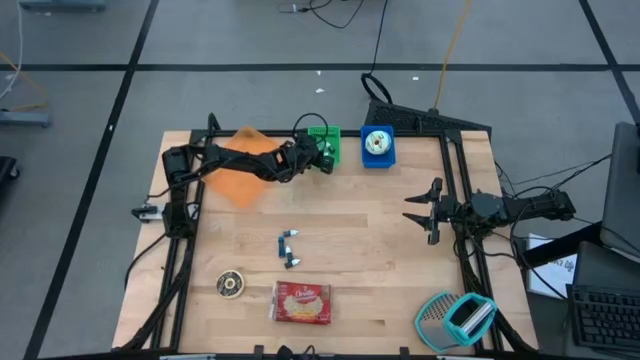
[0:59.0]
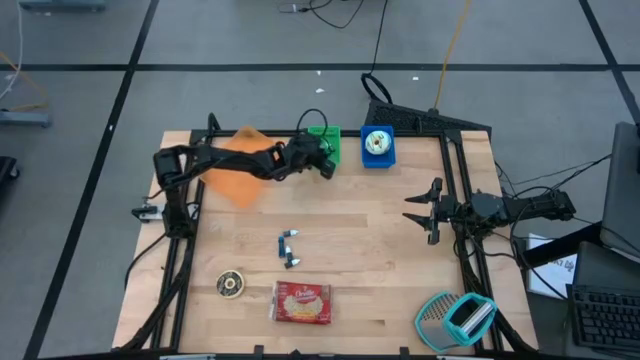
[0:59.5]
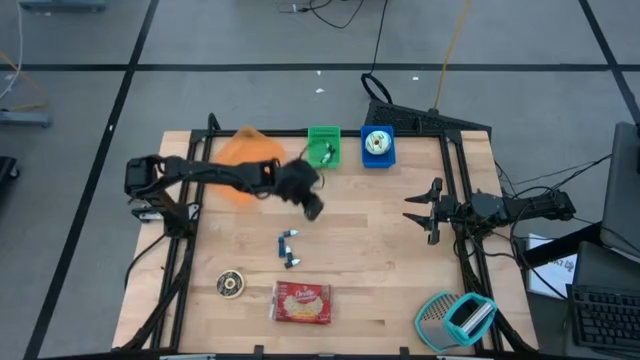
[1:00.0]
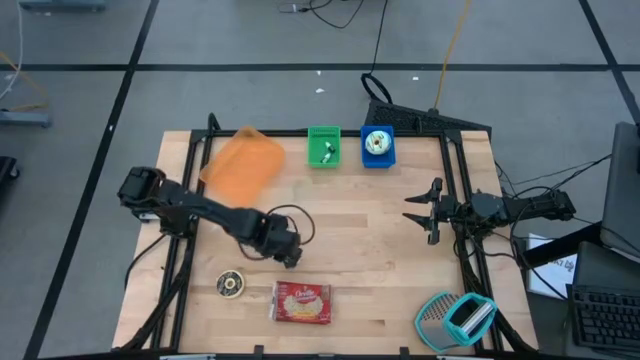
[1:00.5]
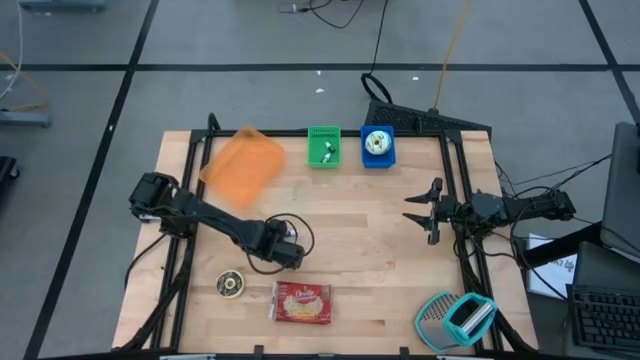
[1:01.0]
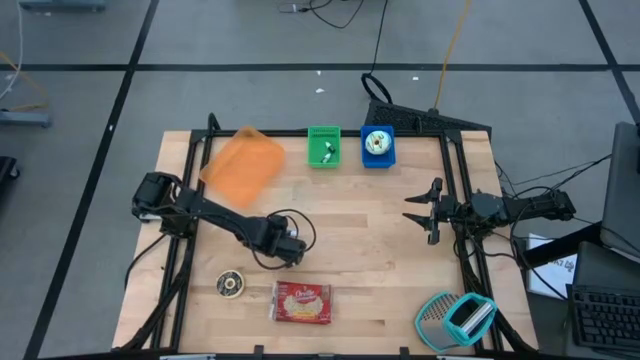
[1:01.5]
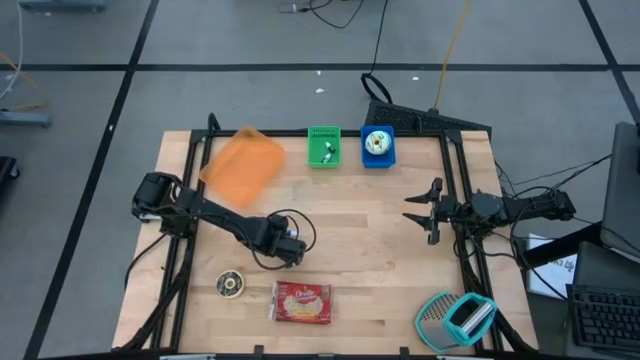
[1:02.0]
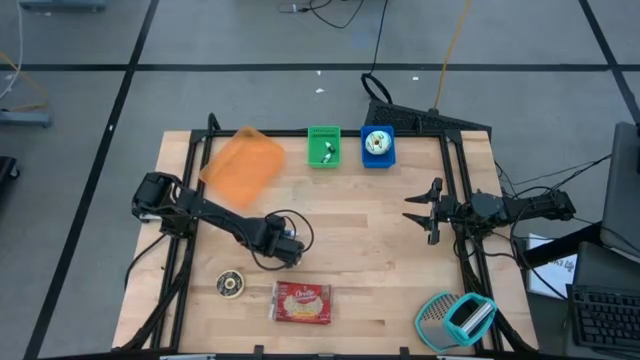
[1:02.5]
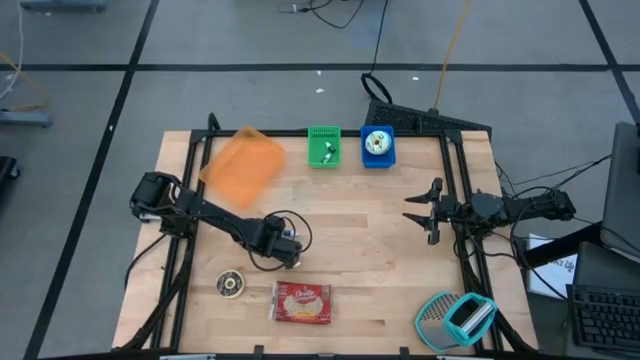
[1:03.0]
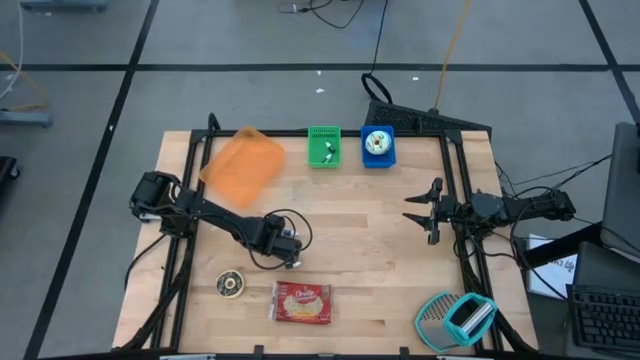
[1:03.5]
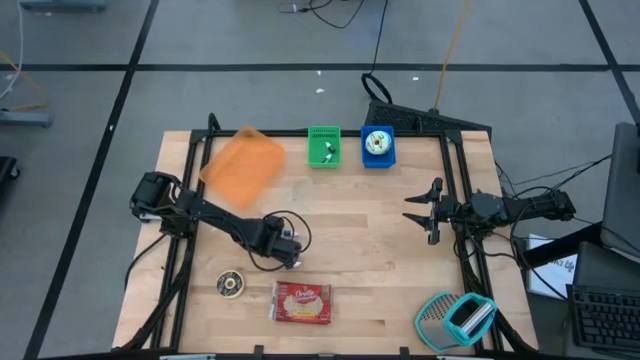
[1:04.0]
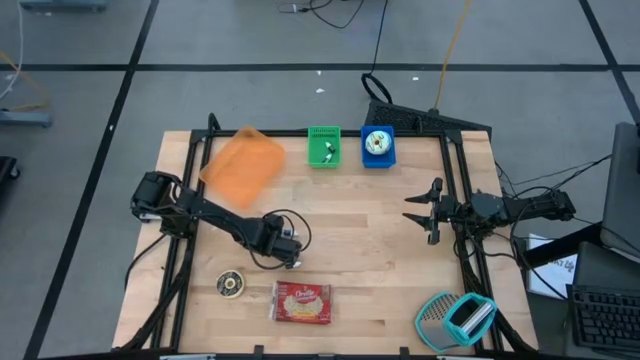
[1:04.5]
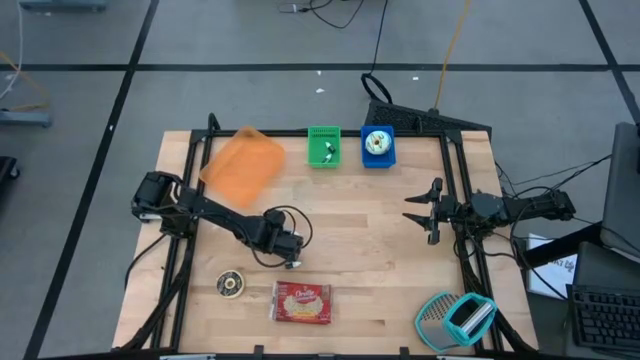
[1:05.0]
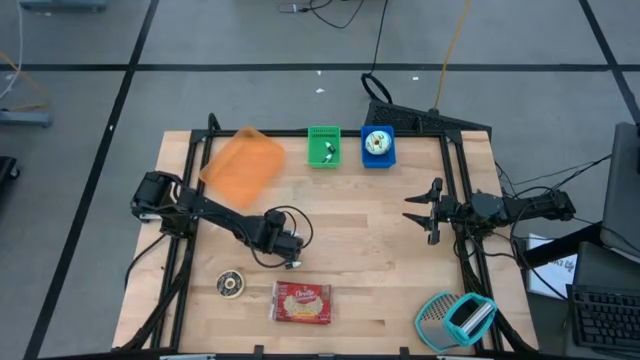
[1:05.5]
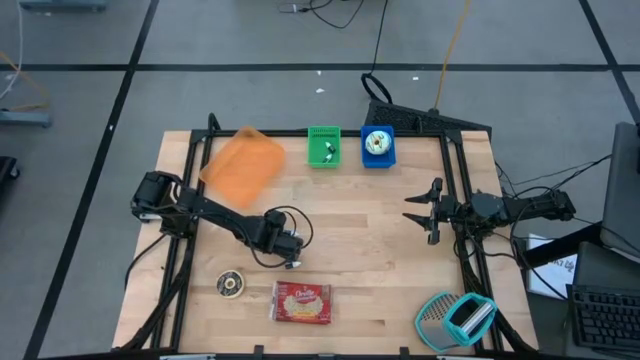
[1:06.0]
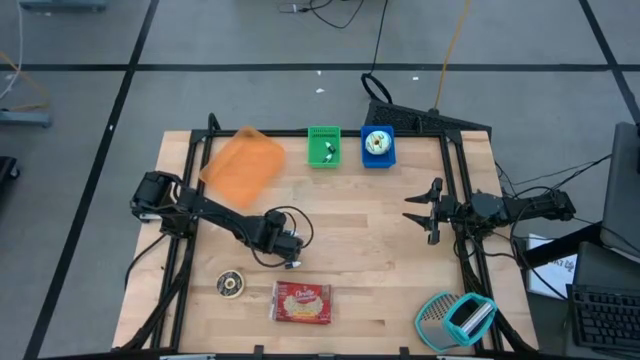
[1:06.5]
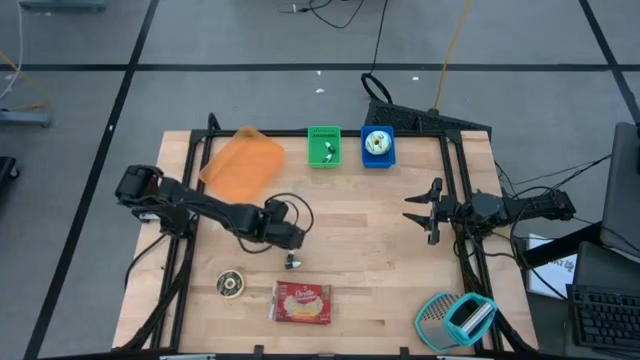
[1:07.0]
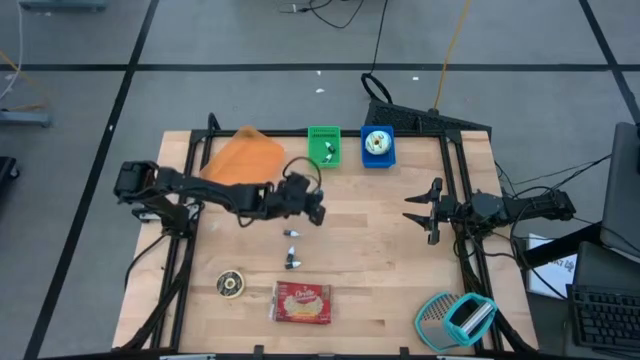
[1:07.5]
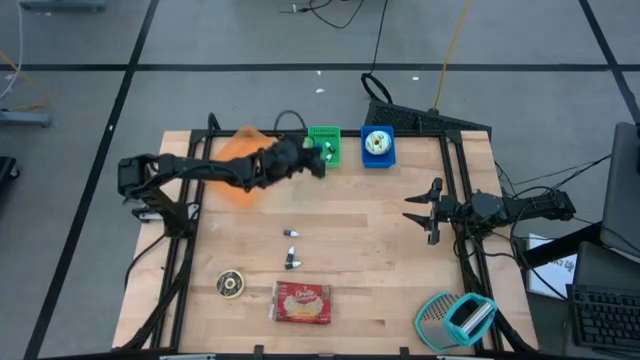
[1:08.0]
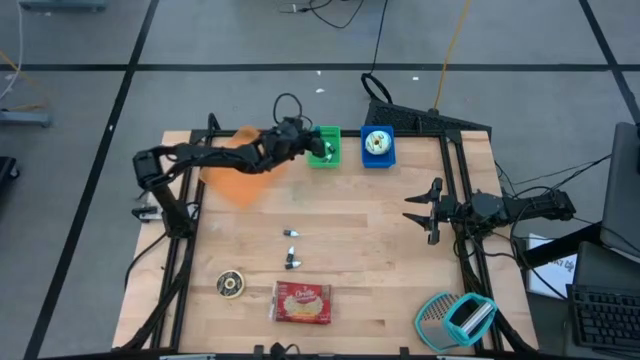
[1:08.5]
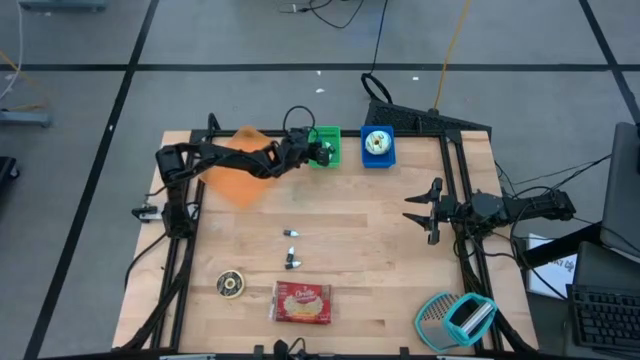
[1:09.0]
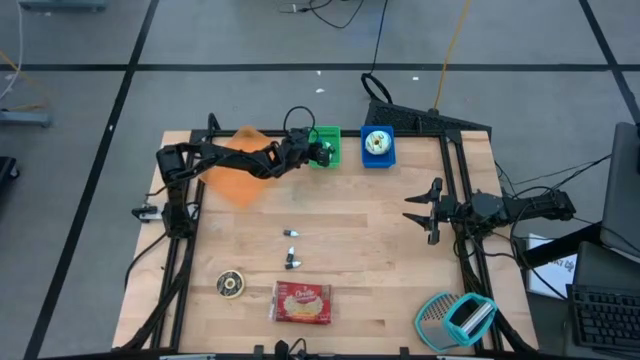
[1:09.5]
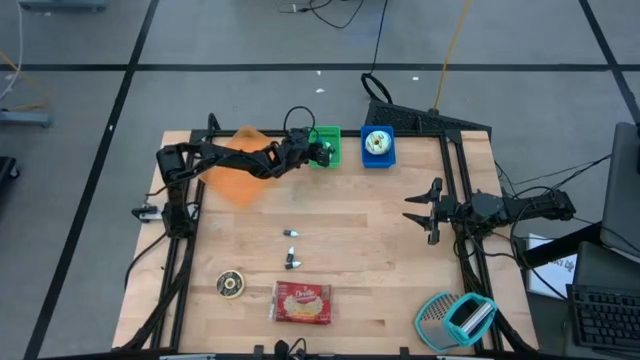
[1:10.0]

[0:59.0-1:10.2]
Put the blue food coloring bottle into the green bin

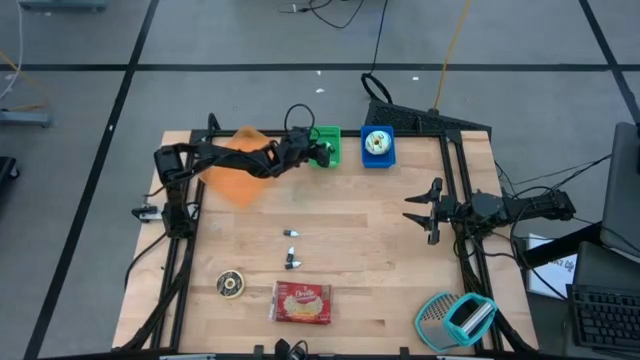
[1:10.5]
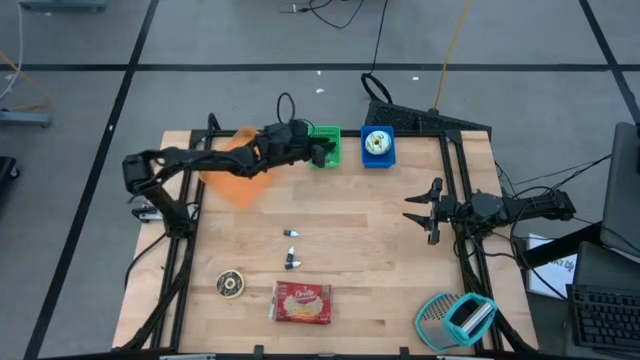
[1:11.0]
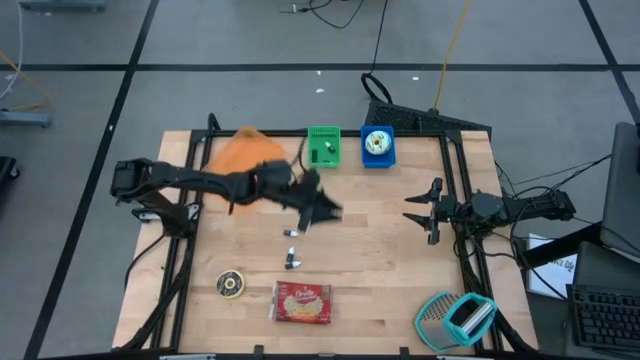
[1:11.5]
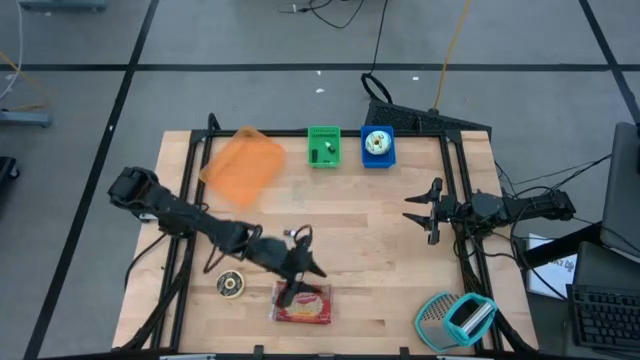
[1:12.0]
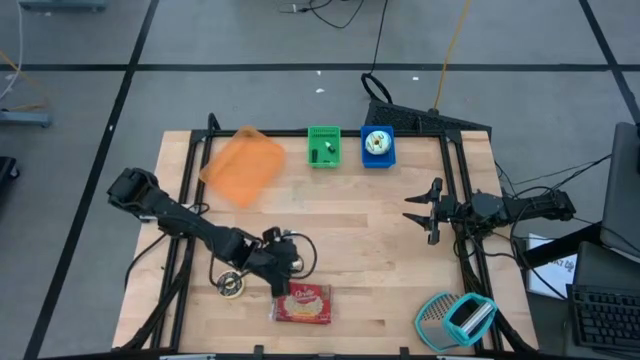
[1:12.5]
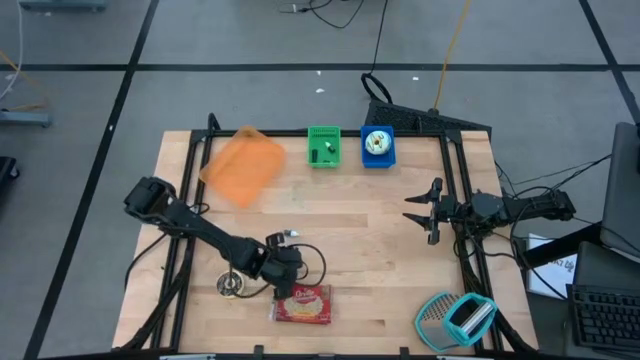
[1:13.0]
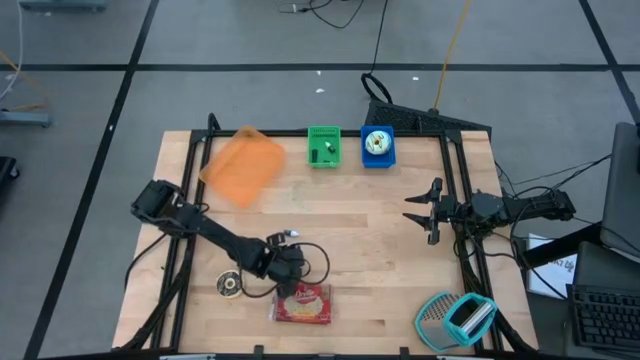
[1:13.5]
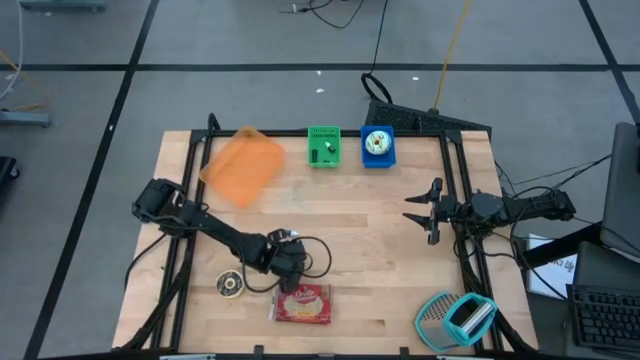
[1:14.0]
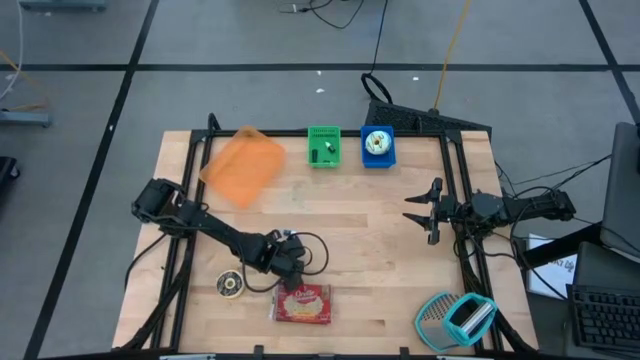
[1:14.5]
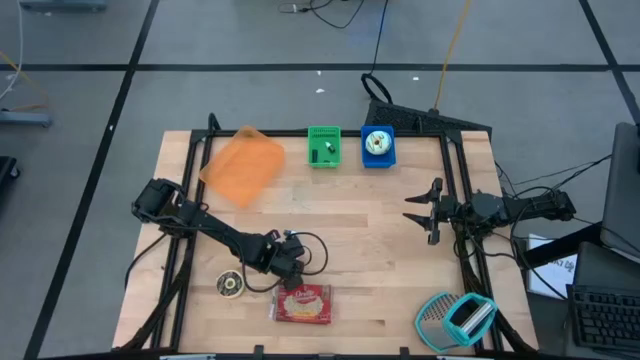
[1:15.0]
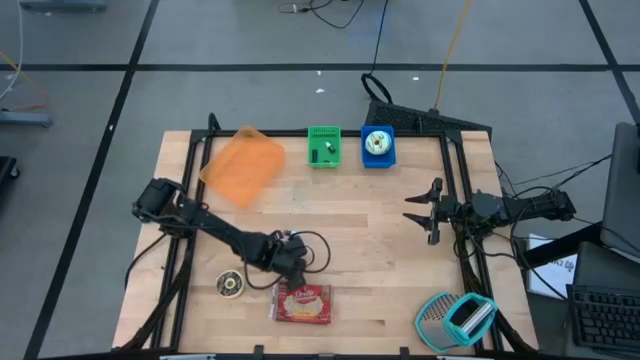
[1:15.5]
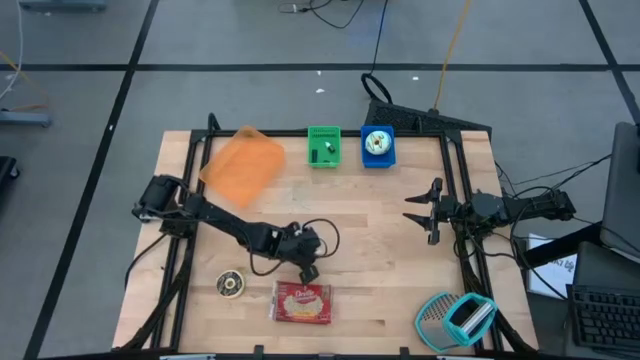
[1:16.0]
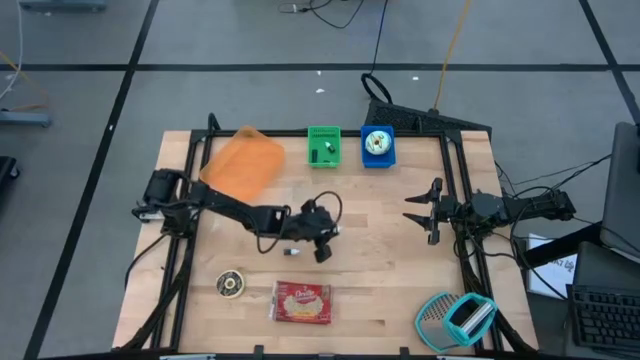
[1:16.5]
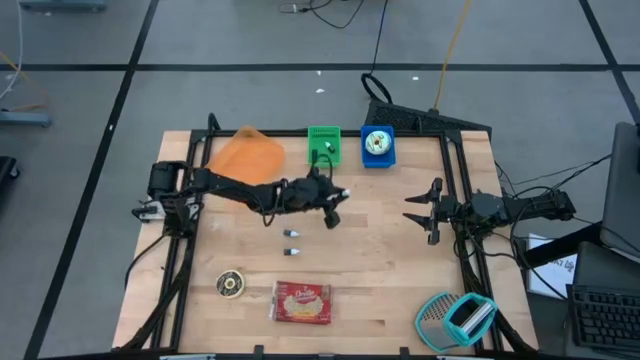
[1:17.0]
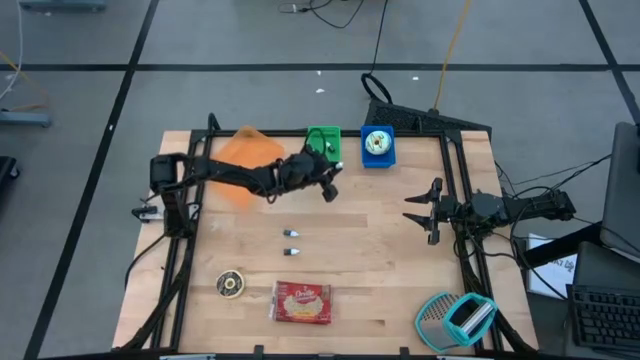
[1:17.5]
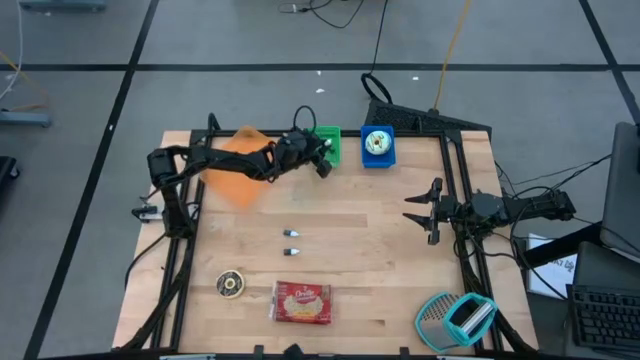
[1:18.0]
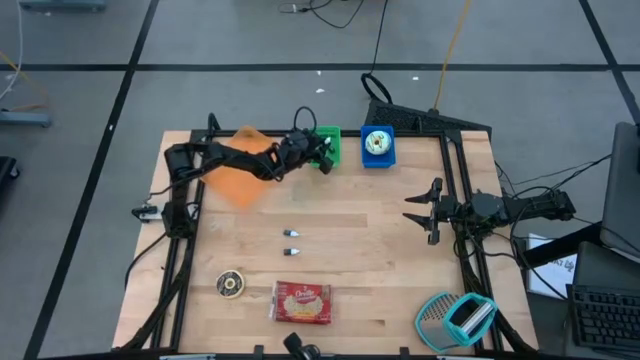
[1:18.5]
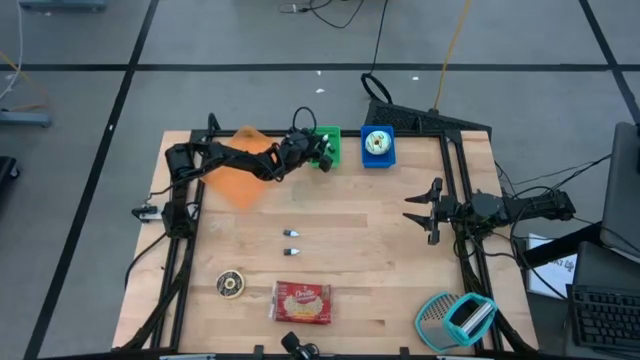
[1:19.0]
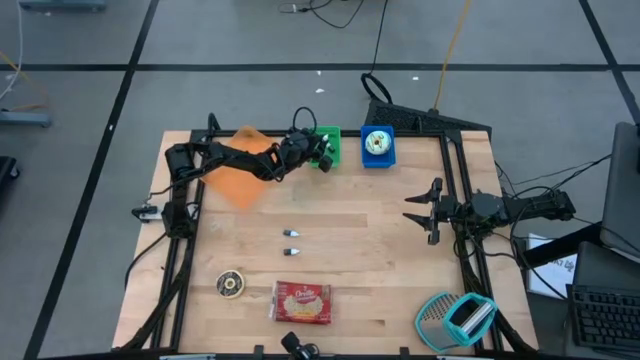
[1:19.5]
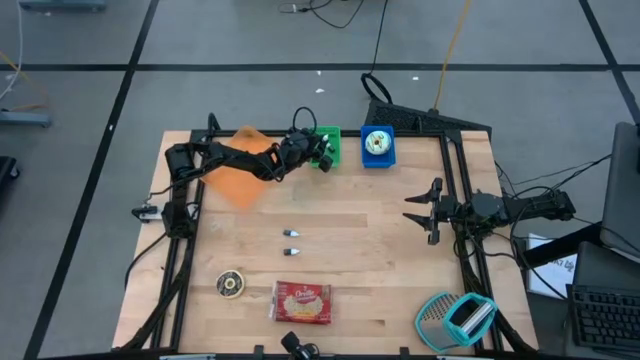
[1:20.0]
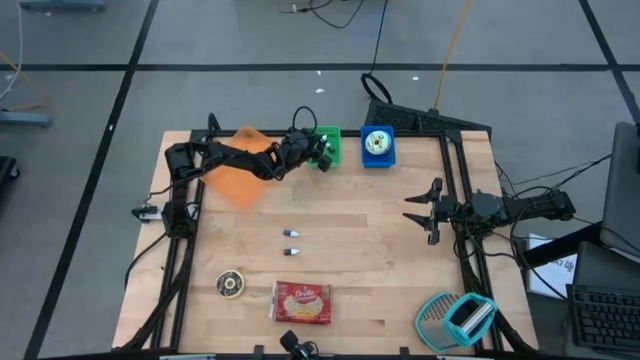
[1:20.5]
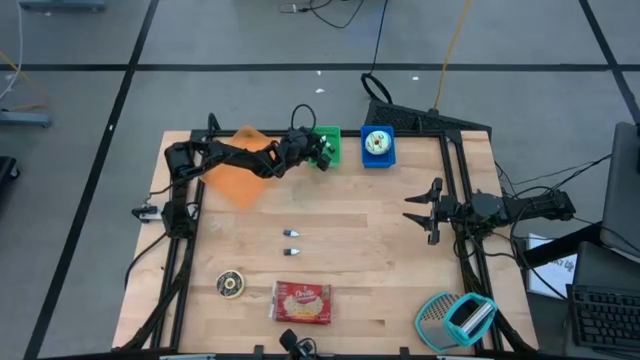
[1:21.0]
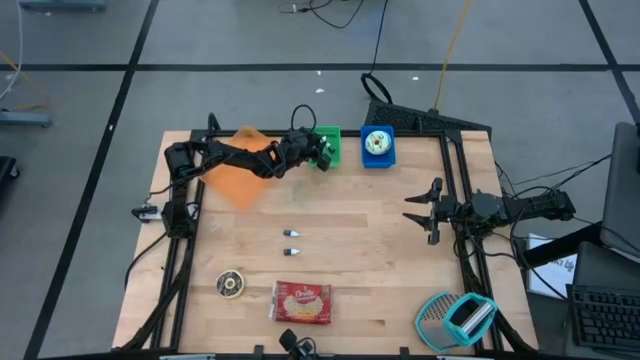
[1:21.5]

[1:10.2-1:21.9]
Put the black food coloring bottle into the green bin
